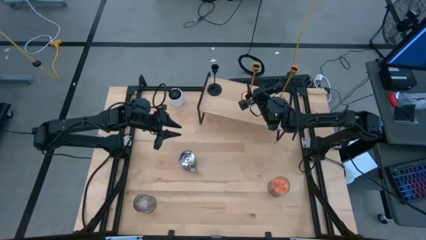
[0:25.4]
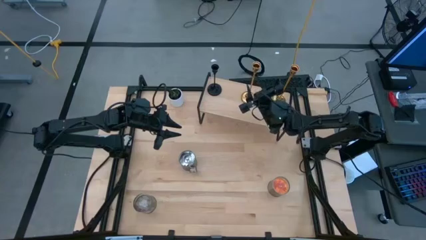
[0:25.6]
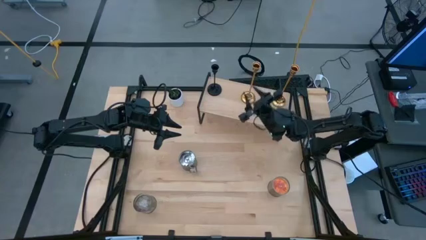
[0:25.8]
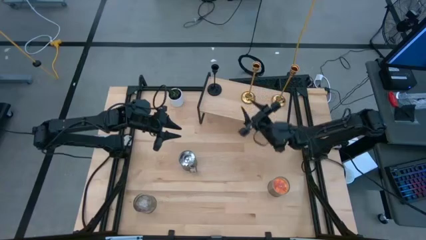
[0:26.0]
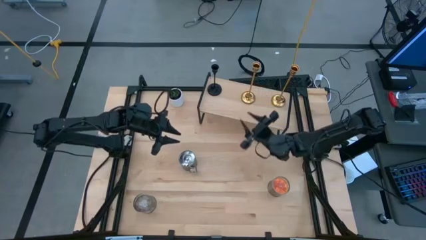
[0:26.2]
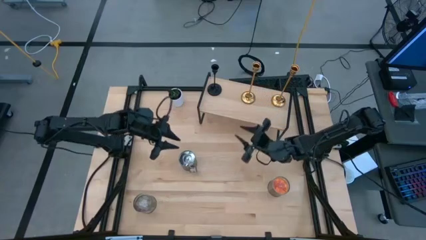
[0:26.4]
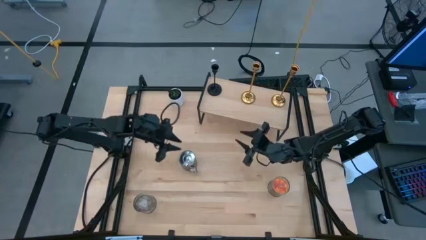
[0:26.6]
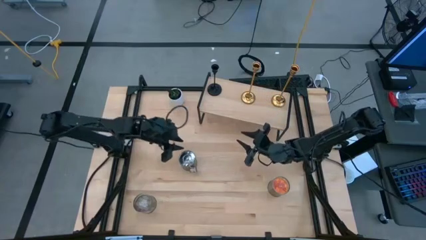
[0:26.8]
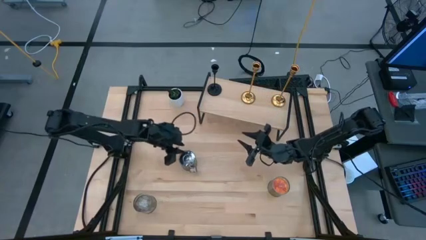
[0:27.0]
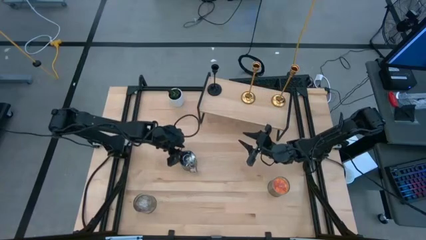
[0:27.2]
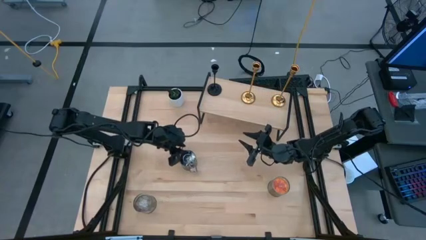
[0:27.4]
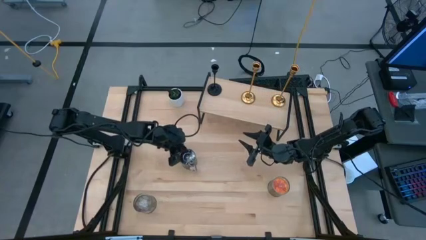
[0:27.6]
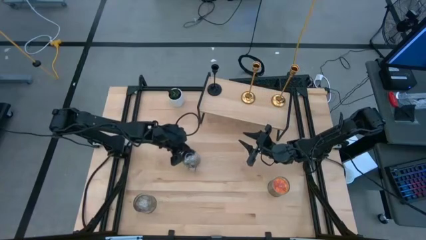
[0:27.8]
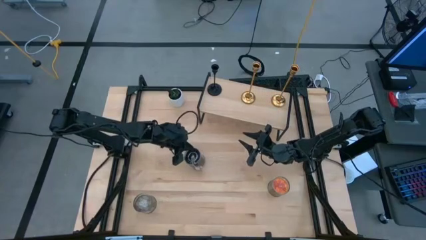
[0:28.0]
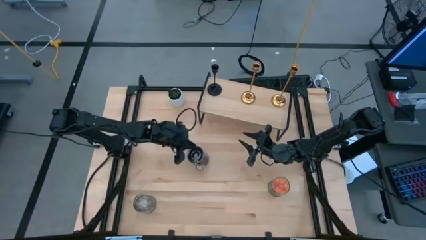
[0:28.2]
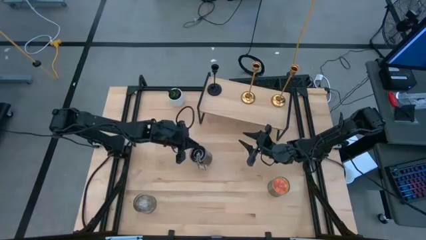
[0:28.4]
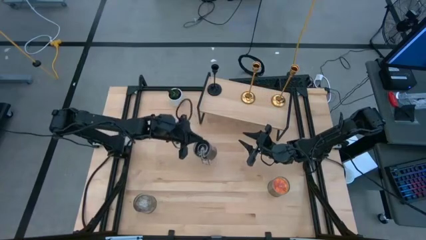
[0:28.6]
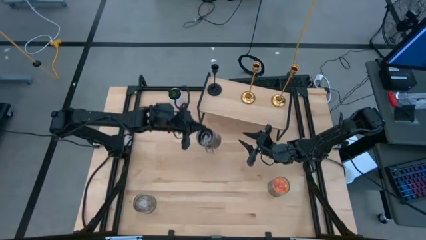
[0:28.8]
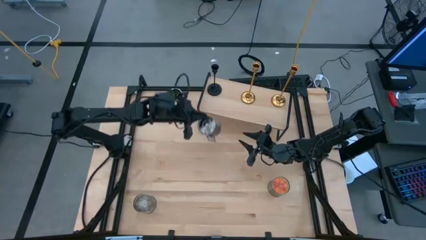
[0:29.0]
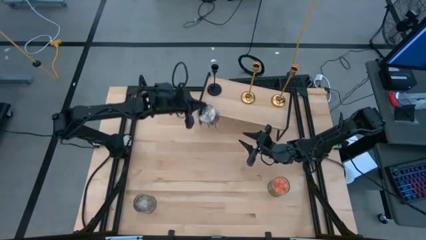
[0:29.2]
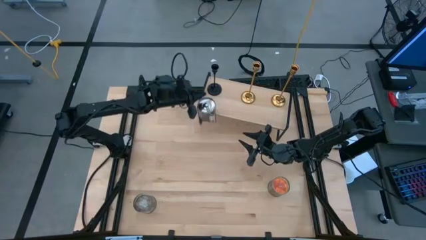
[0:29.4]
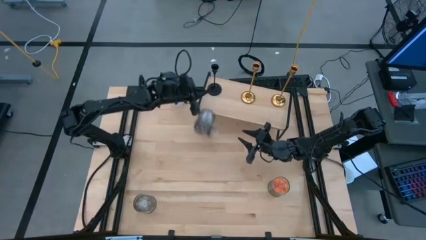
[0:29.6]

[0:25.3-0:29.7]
Task: Pick & Place candle stick holders
Put the top brown scented candle on the shelf

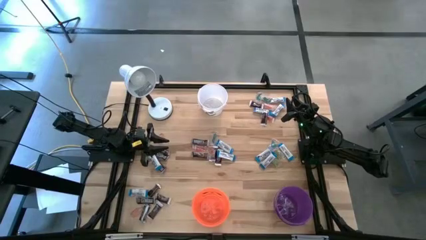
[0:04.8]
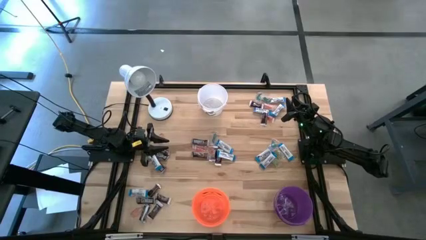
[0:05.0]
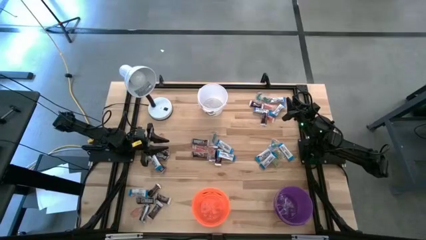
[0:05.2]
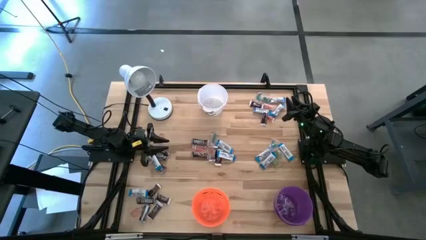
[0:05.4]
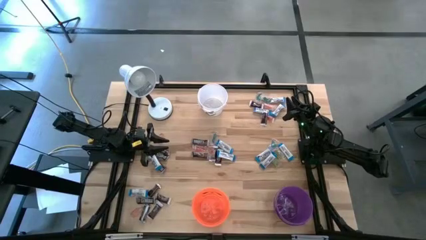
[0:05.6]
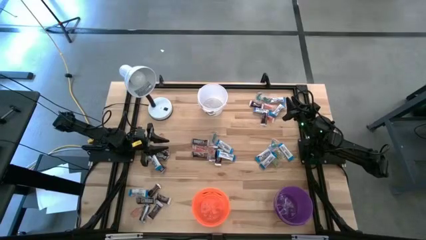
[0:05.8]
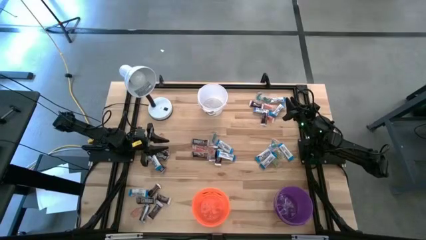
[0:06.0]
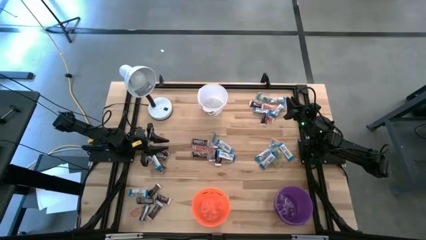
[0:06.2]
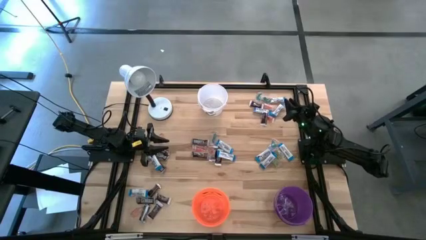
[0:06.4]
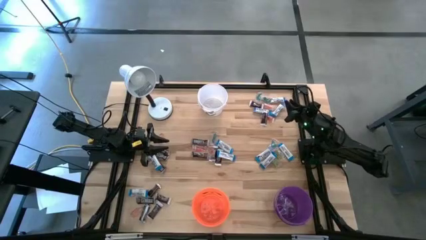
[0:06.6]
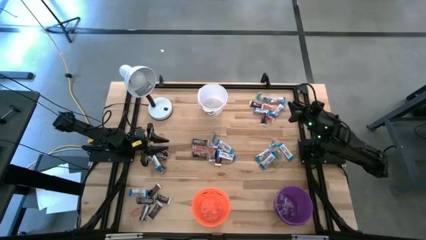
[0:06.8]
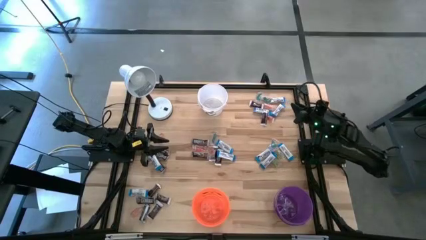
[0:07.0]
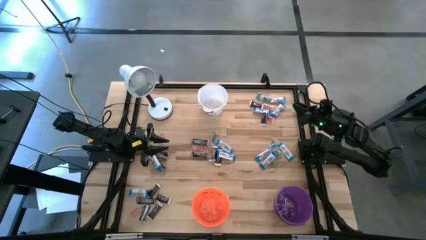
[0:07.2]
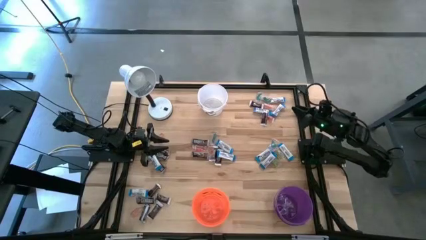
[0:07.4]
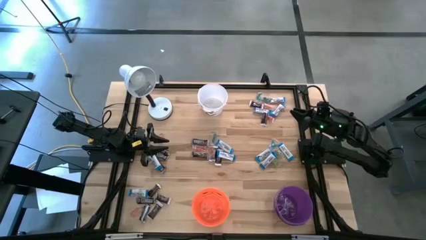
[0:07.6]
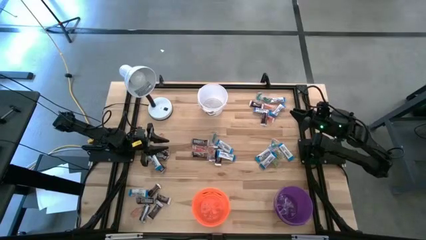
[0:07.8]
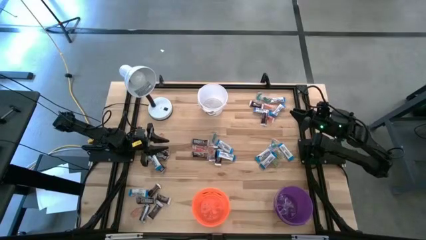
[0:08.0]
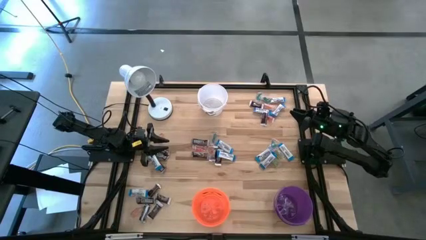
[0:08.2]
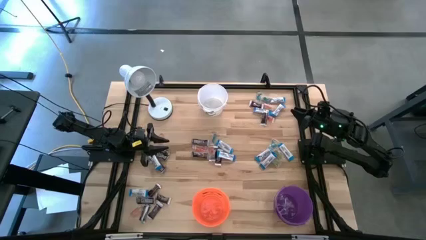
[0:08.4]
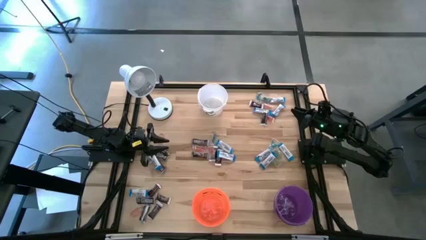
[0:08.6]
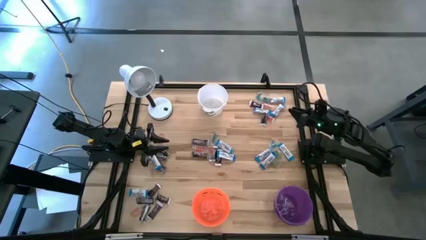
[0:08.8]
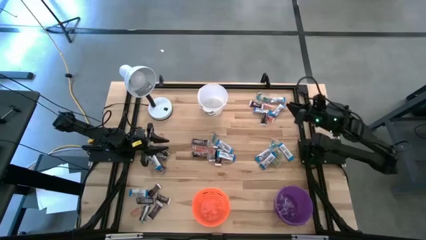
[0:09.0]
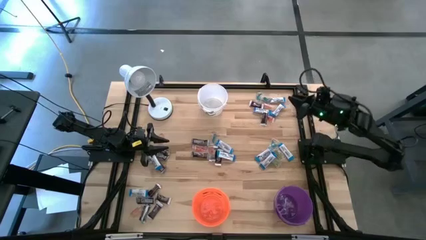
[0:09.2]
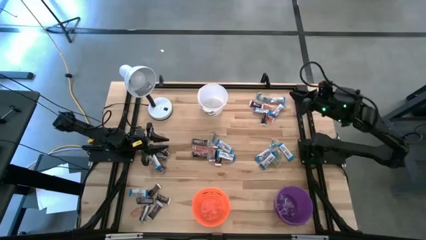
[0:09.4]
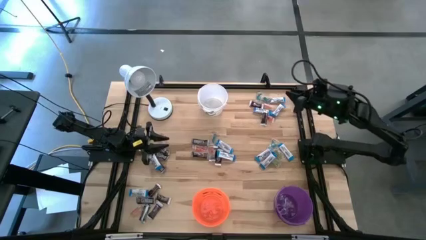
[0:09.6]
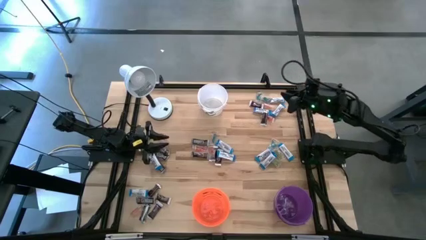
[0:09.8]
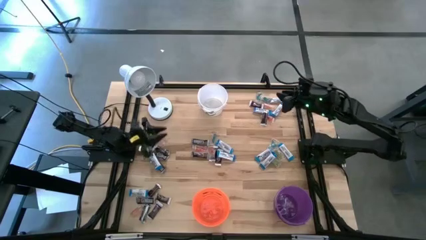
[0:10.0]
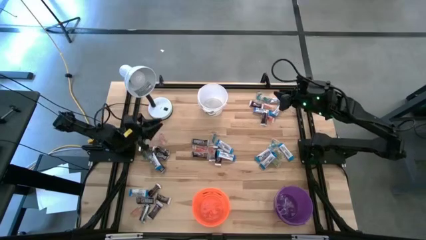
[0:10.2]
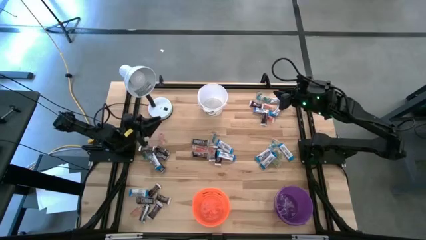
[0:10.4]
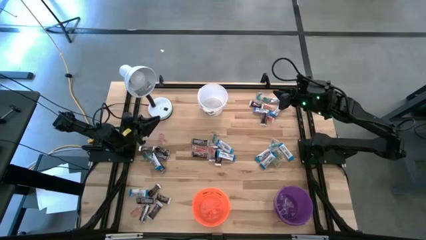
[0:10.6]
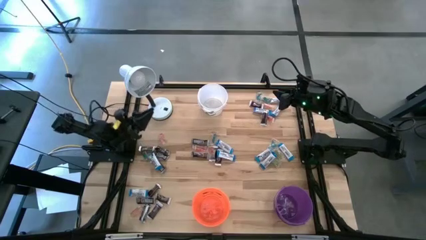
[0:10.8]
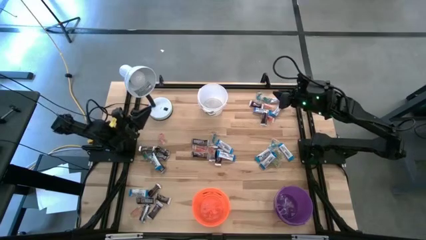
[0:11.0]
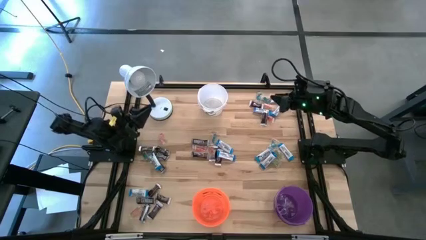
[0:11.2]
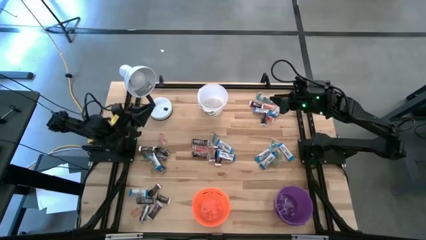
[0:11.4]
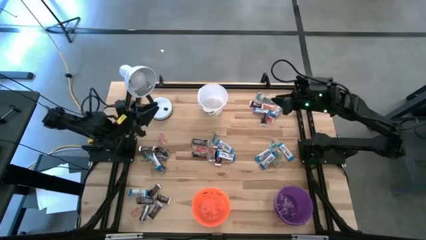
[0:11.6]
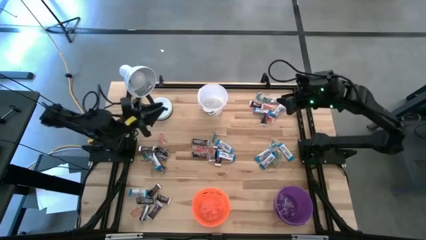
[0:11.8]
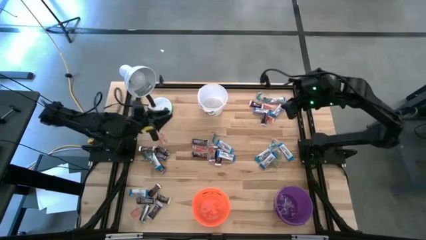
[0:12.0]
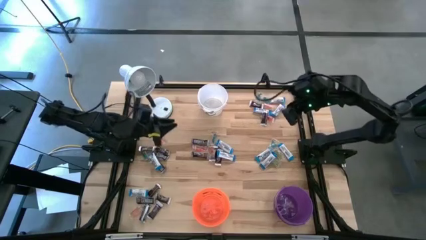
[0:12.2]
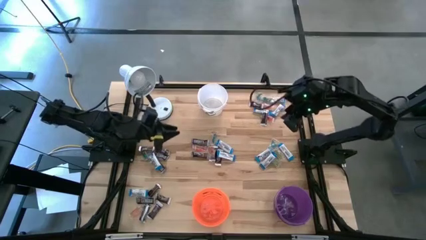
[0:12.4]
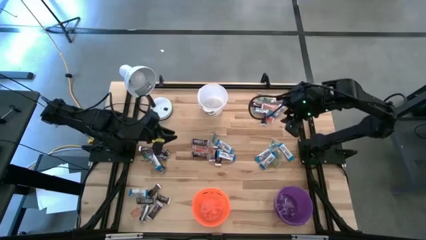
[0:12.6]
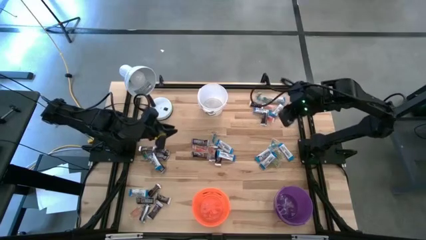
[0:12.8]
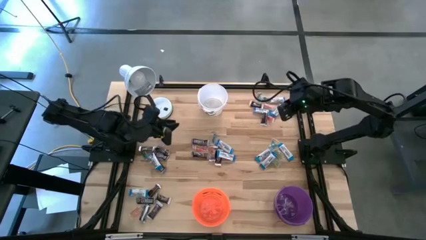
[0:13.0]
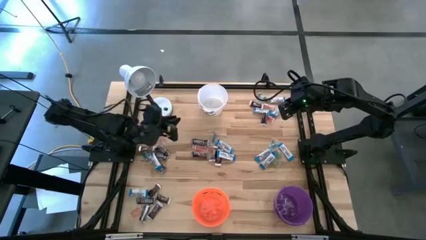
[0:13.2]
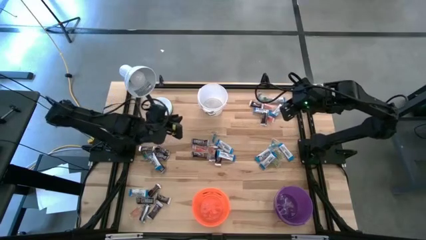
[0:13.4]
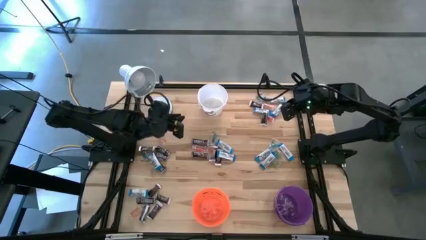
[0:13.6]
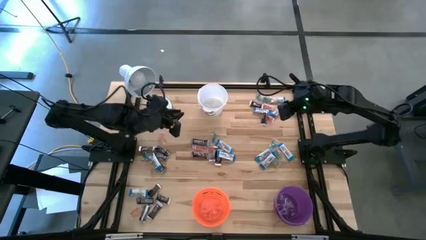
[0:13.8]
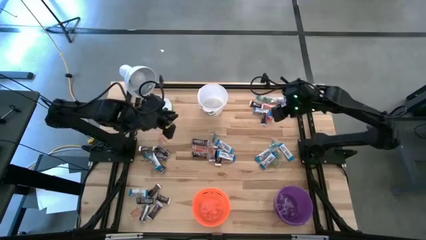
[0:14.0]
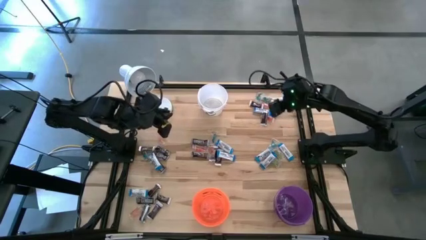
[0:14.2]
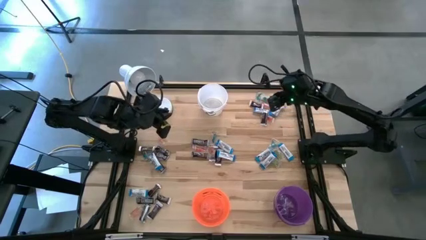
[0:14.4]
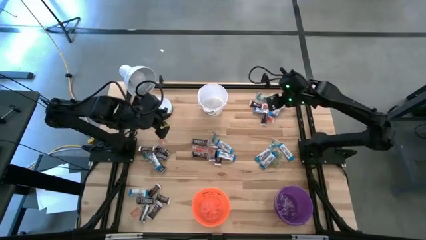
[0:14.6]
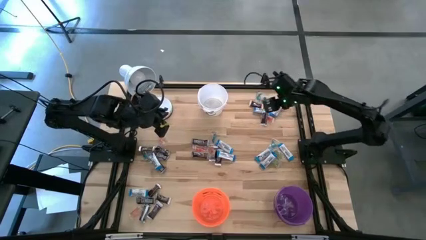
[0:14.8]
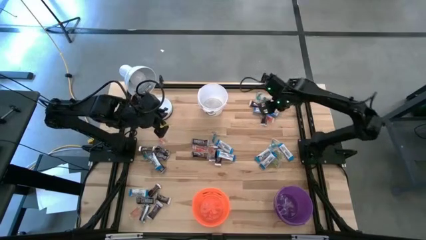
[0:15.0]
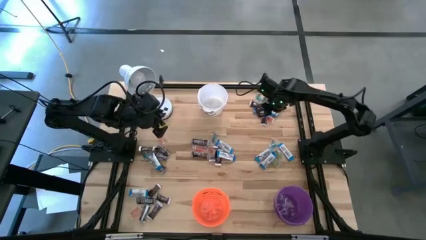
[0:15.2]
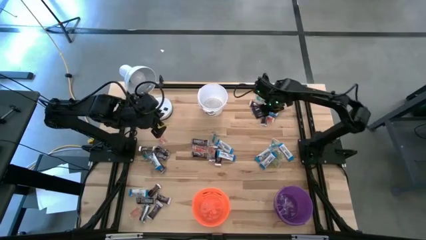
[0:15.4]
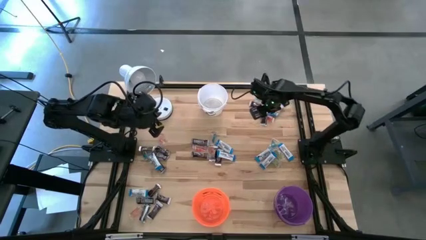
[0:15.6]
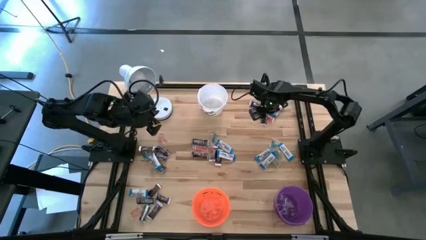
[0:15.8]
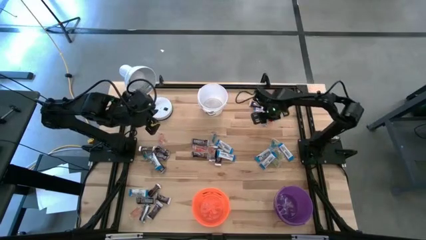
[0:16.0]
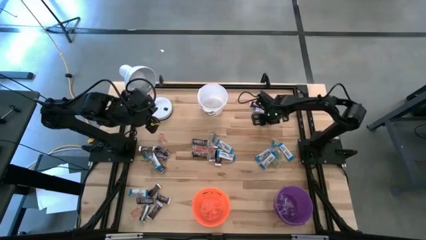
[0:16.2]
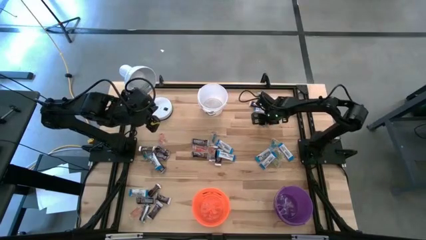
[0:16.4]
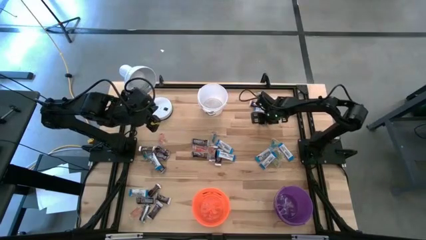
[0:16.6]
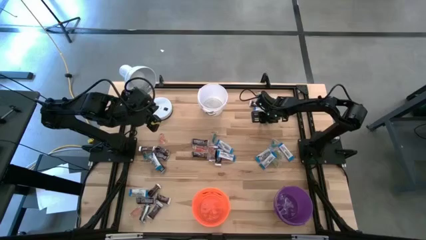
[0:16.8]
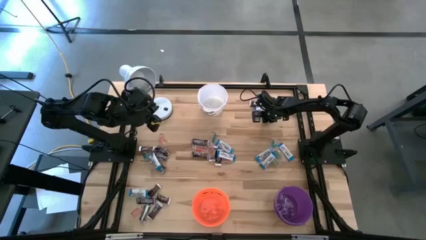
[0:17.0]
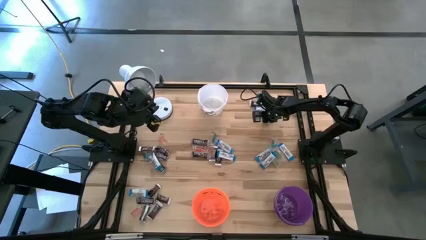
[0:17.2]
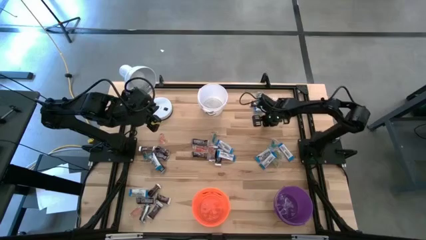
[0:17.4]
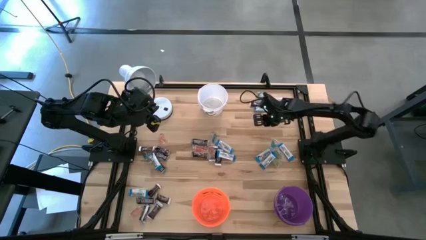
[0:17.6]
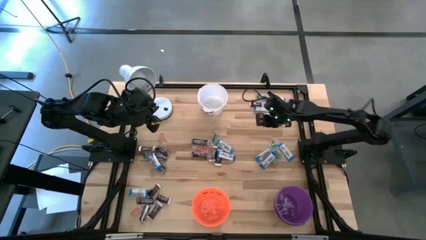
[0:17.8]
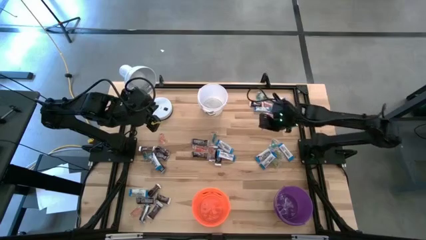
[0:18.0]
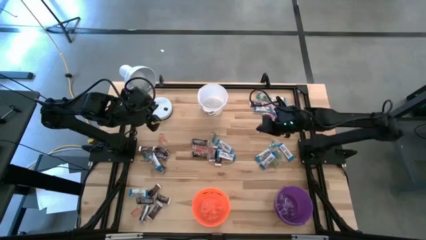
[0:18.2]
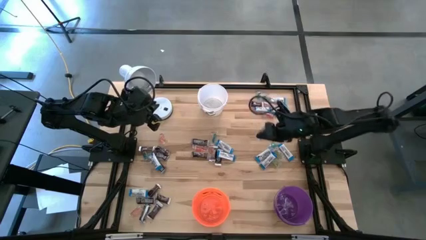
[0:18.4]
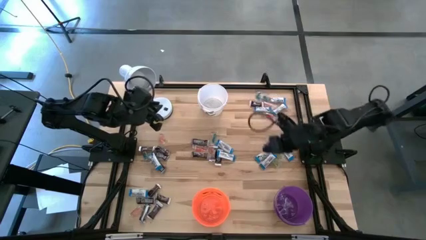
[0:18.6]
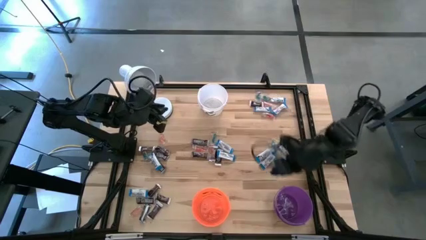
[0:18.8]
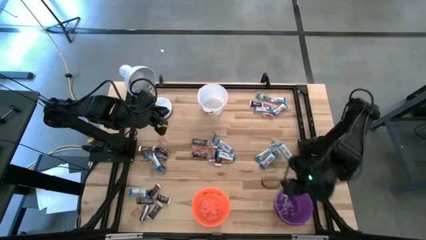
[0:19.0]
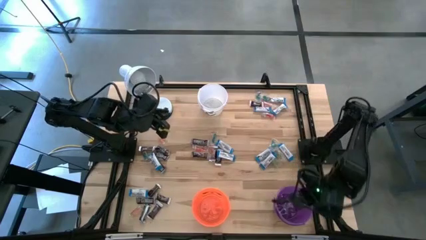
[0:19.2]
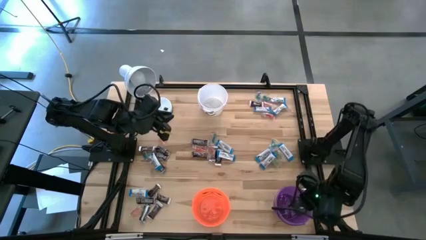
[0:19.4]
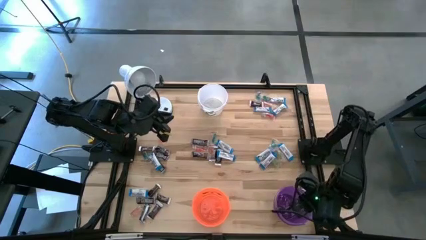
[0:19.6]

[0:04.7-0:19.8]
Task: Organize candy in baskets
Put the dark brown chocolate bar into the dark purple bucket
